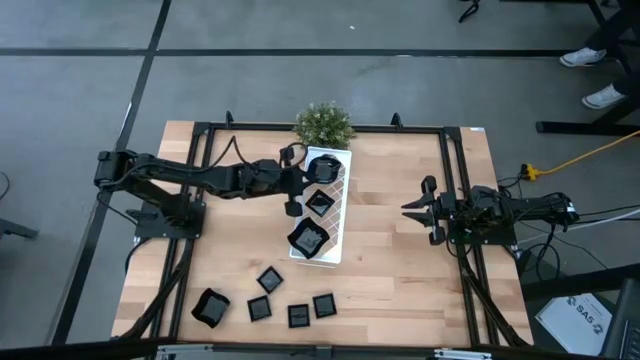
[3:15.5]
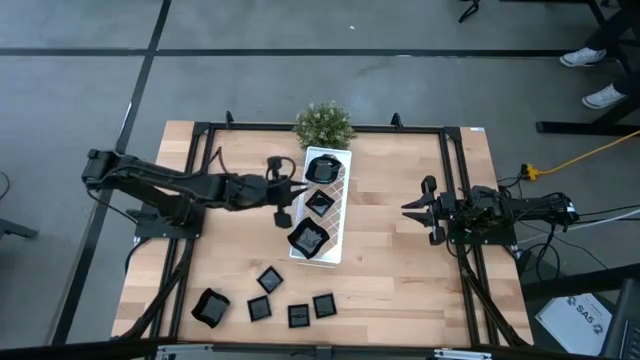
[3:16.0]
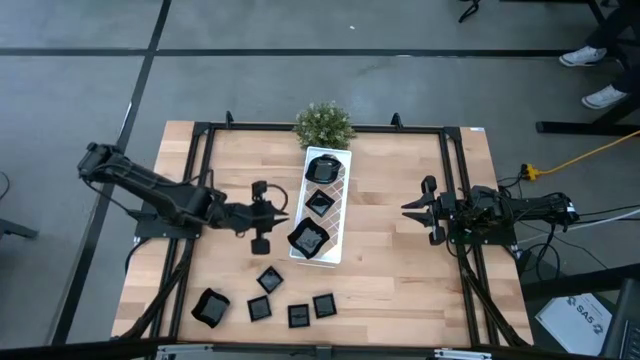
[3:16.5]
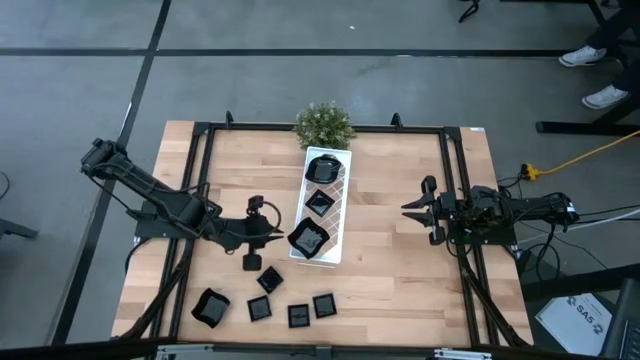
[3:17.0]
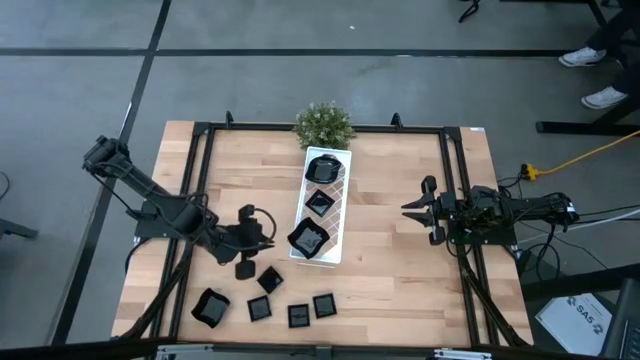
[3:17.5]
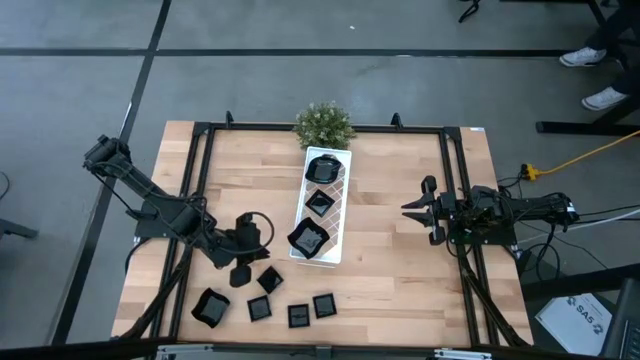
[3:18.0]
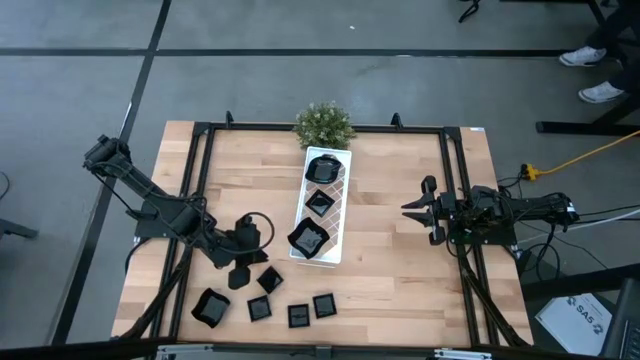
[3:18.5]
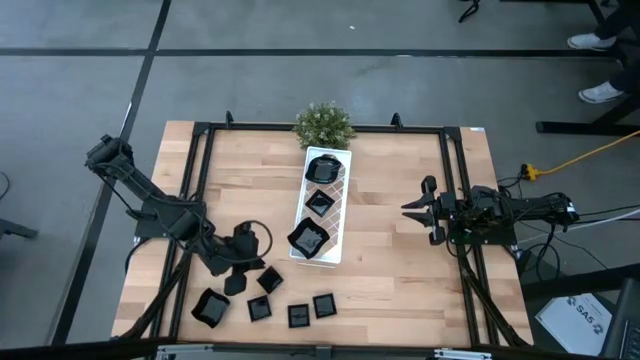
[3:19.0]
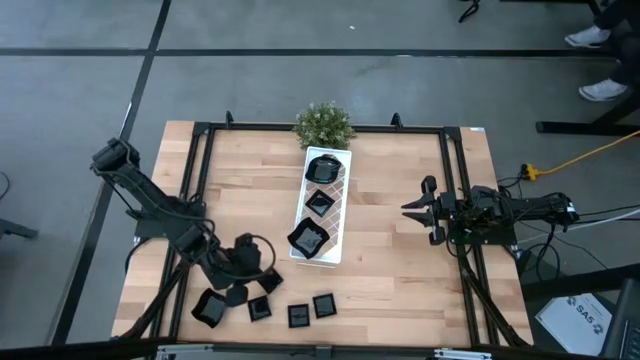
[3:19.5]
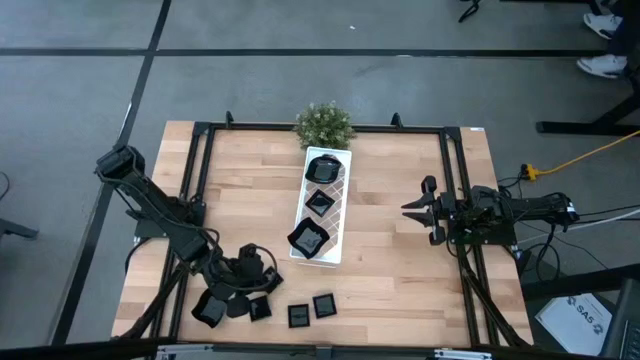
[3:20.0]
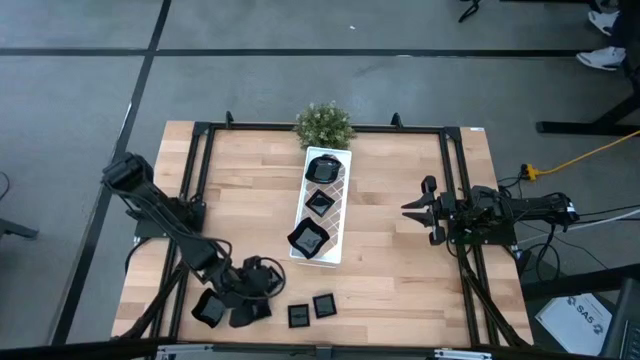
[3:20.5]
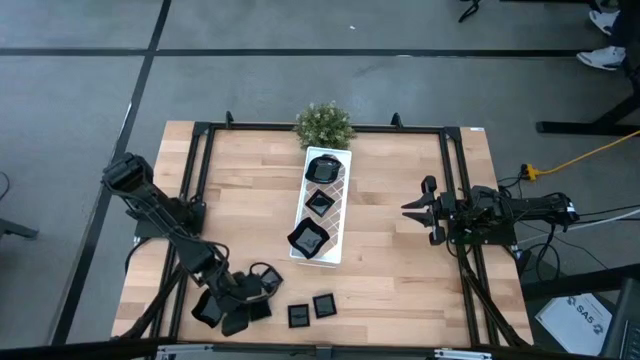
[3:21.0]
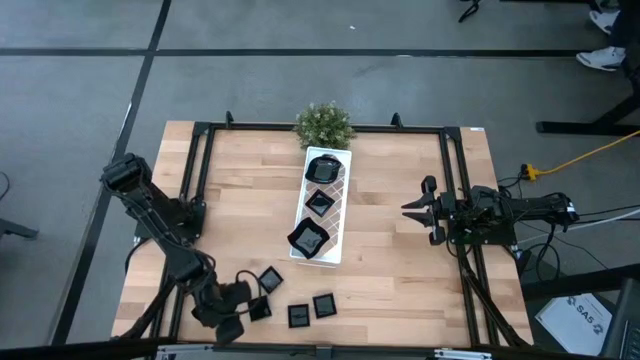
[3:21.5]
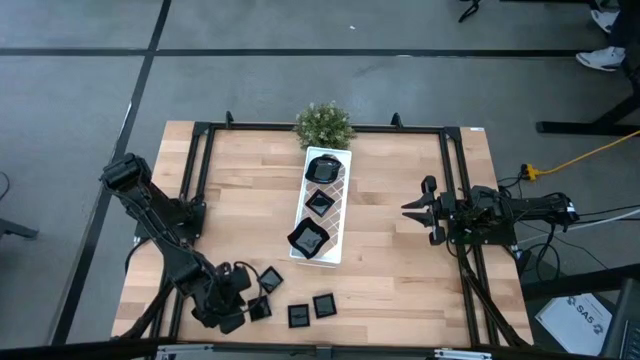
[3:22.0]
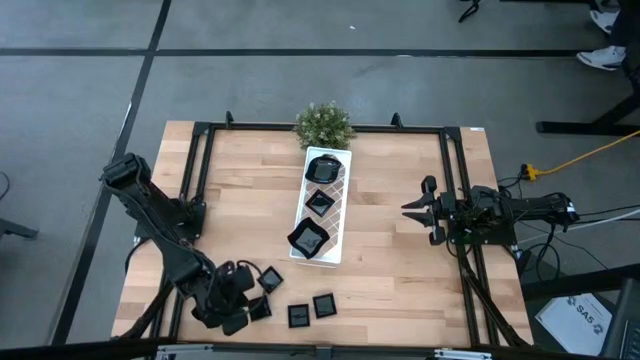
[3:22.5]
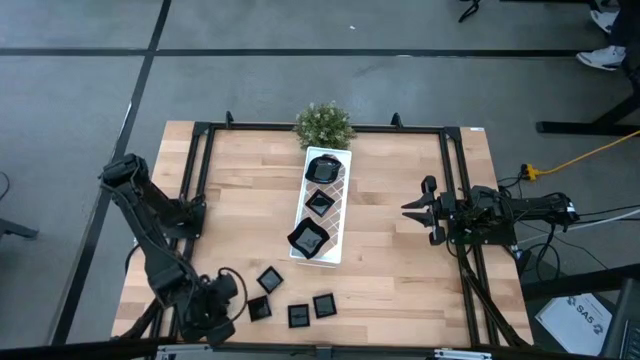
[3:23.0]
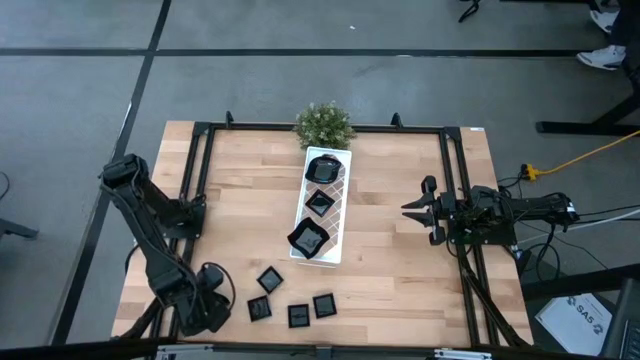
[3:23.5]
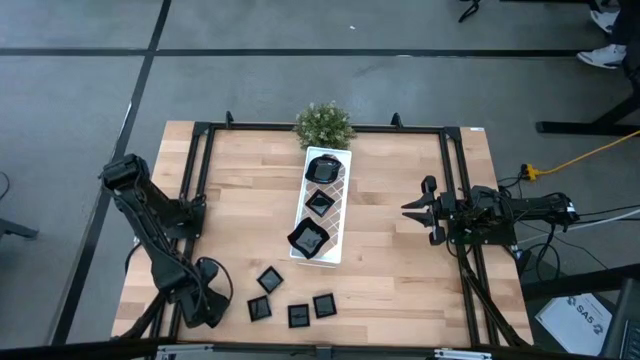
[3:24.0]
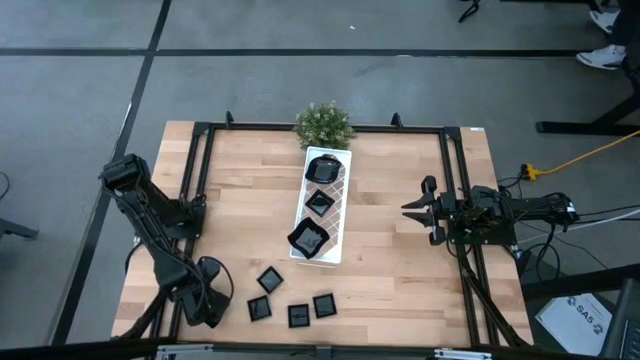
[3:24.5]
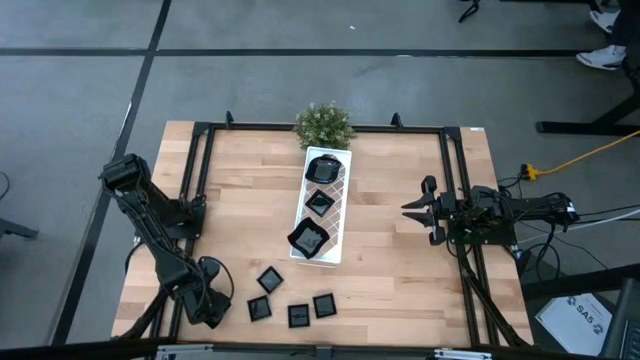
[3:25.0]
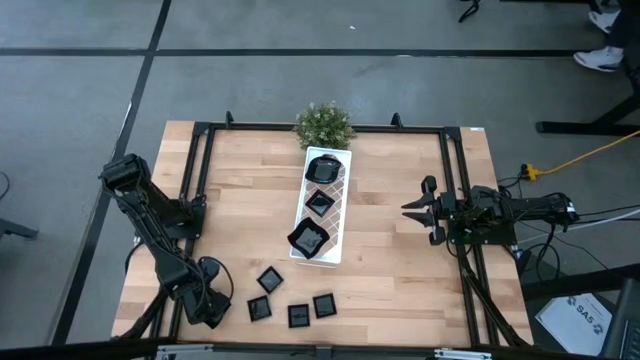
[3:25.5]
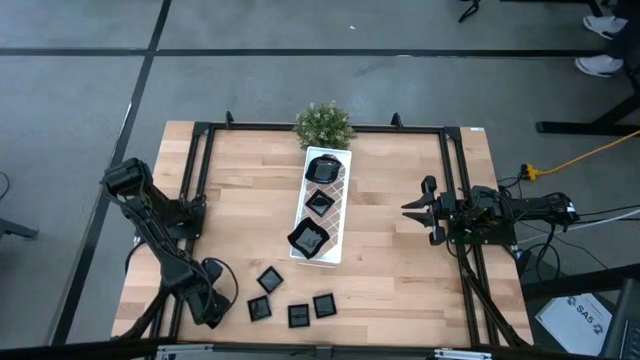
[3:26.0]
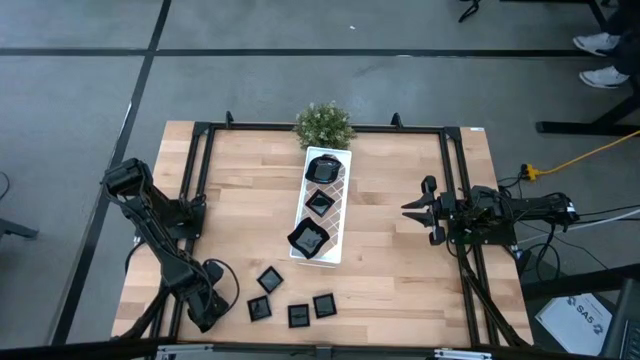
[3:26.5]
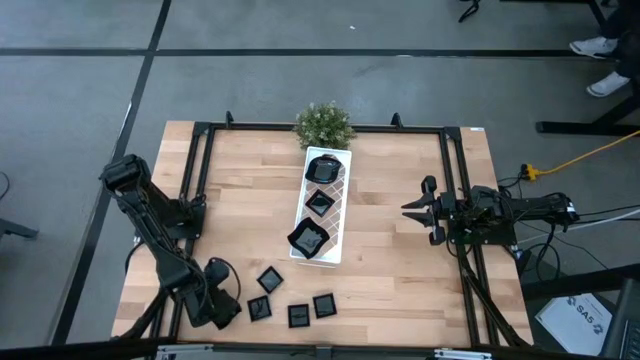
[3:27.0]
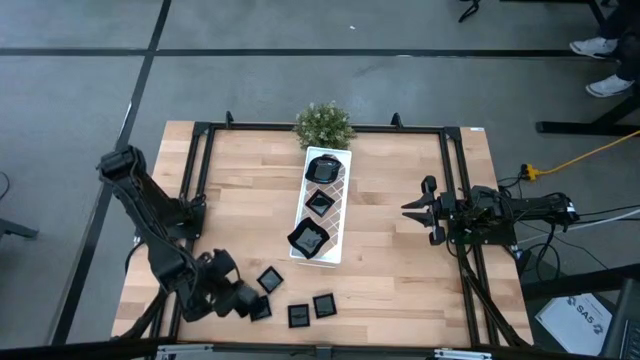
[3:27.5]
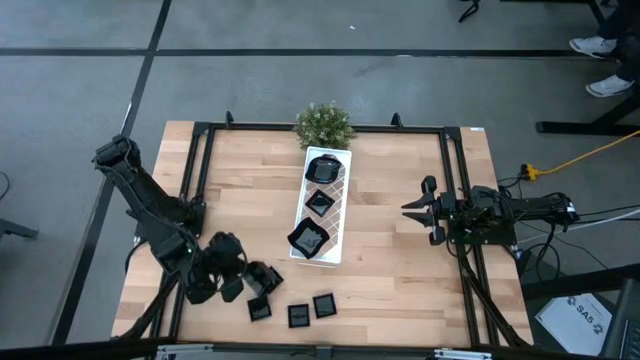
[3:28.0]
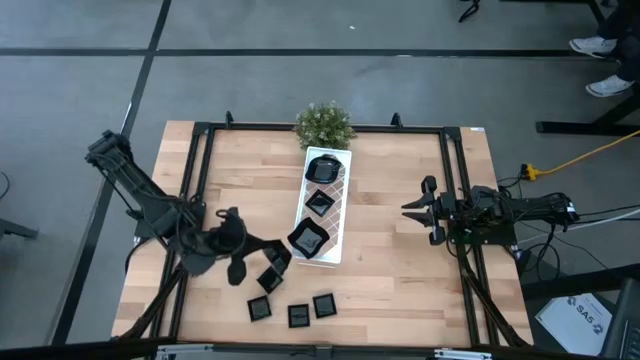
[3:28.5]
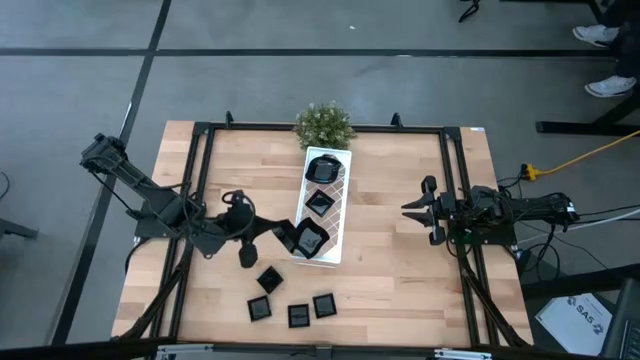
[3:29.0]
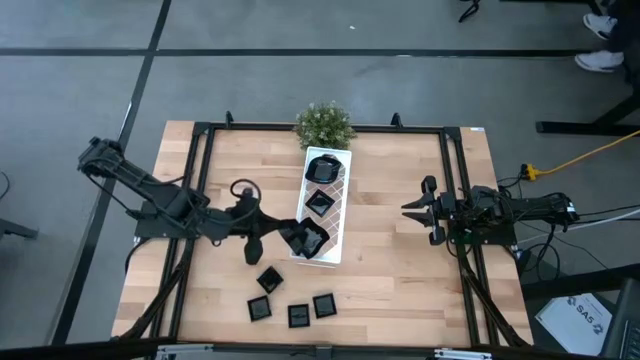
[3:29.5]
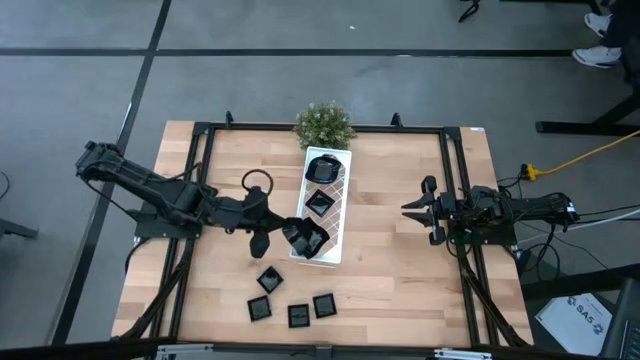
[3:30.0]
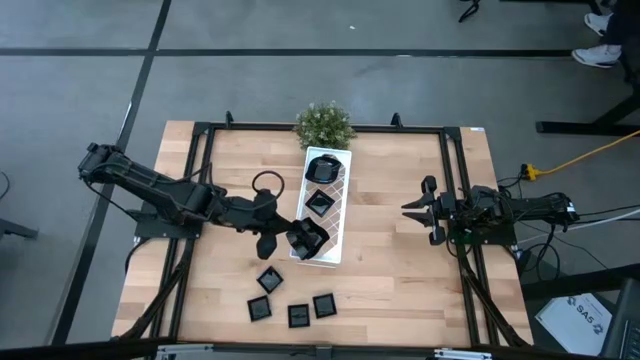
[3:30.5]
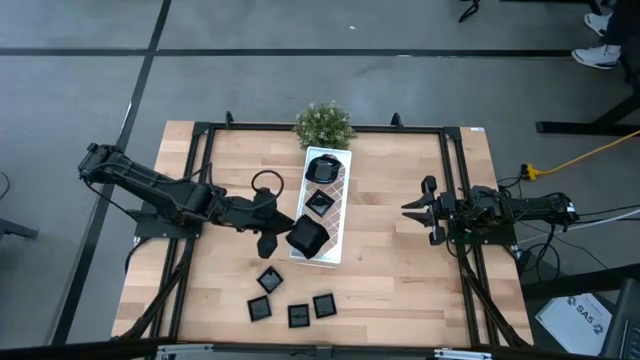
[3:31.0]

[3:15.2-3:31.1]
Task: Pick & Place Mini shaped plates
Stack the distorted square plate on top of the distorted square plate on the shelf

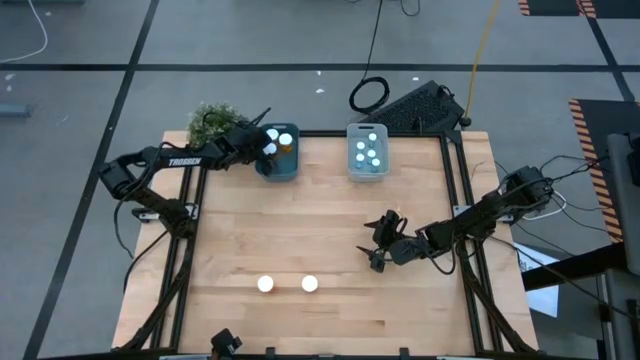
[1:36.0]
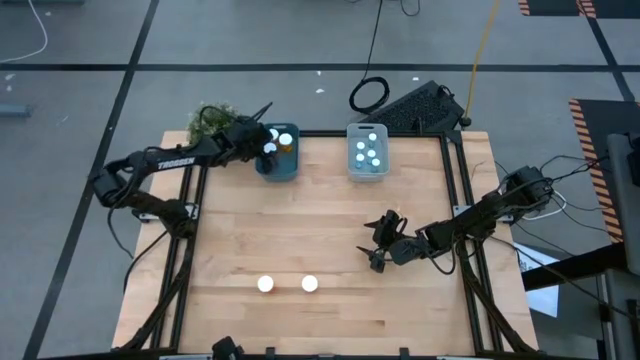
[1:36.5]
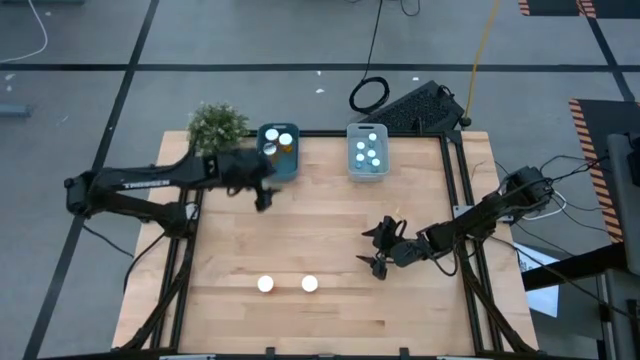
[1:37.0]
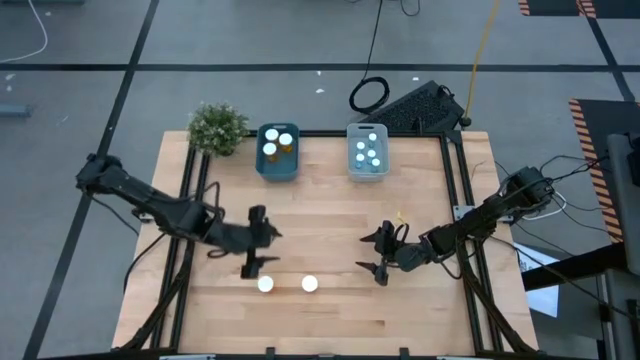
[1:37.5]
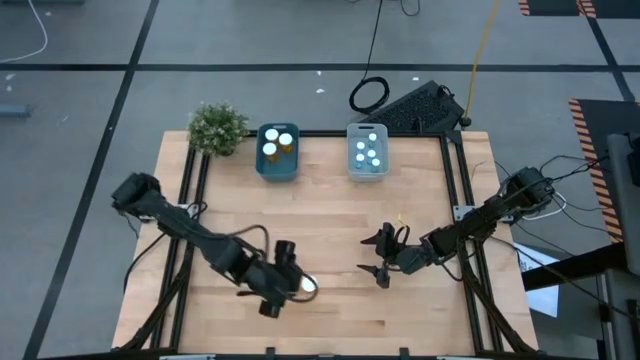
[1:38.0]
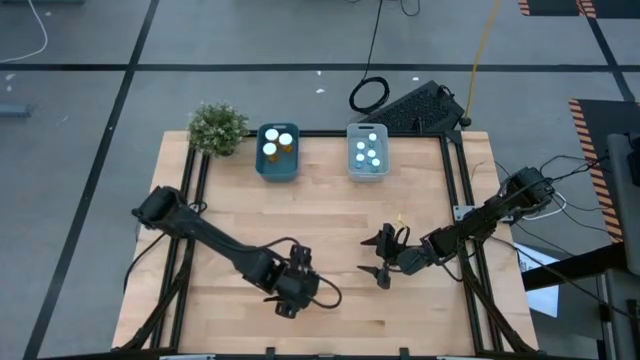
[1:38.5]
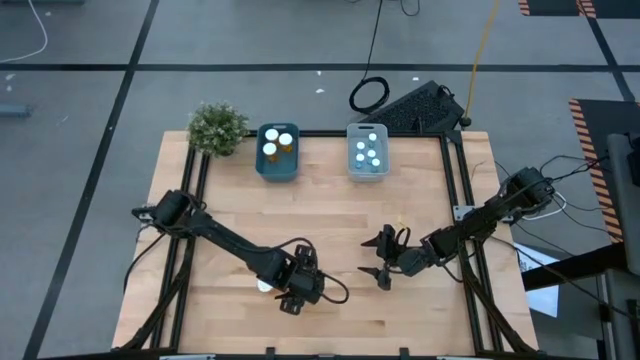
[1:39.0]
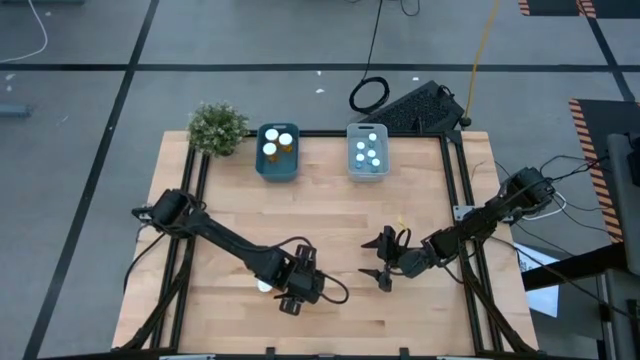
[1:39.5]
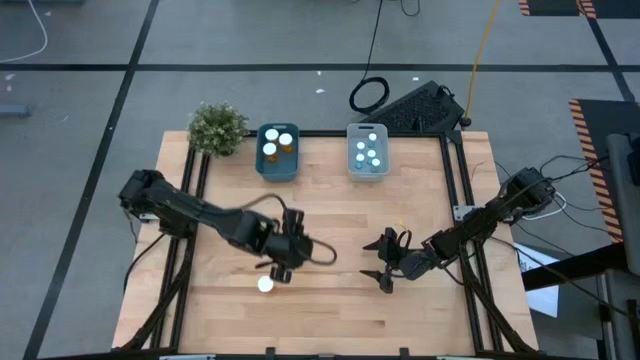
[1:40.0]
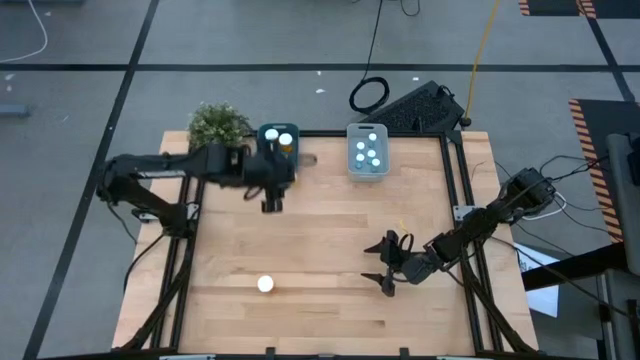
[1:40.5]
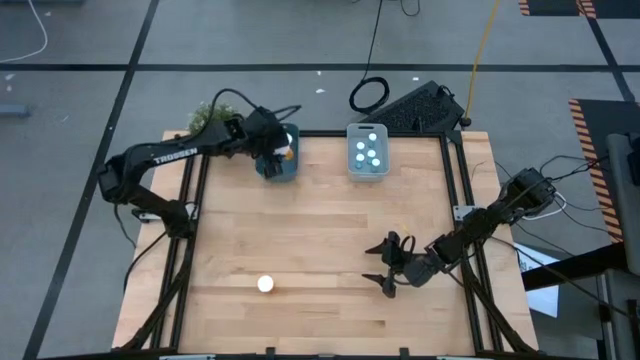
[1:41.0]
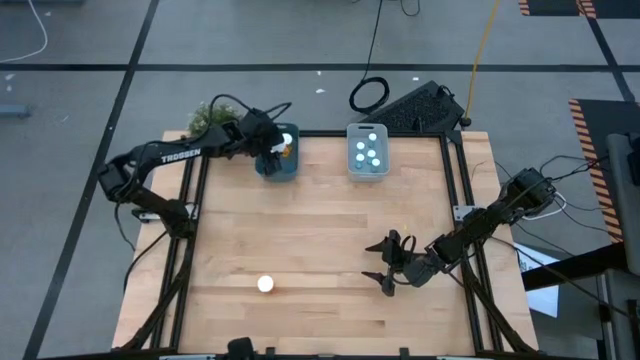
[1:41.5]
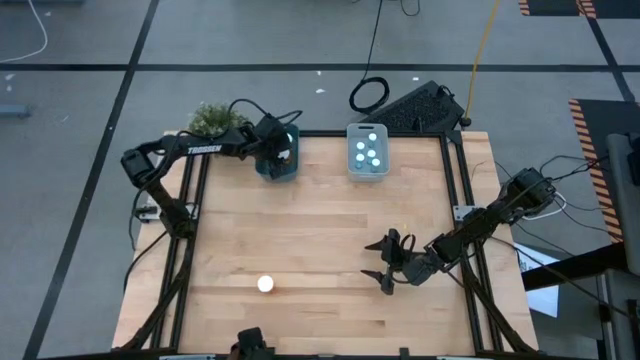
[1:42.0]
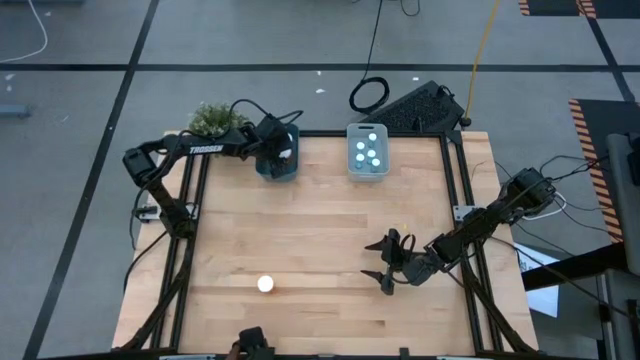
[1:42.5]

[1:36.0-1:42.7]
Task: Pick and place medicine bottles into bin by pill shape (circle, oval)
Put the orange pill bottle into the green bin
